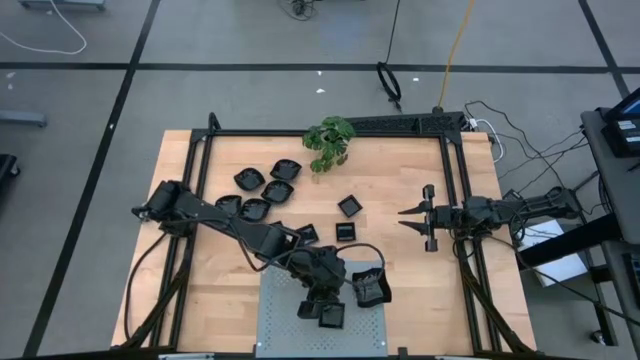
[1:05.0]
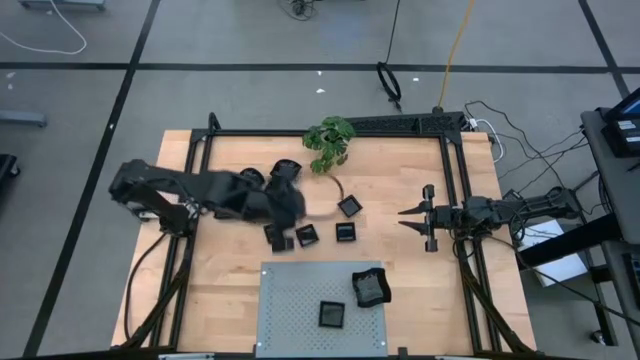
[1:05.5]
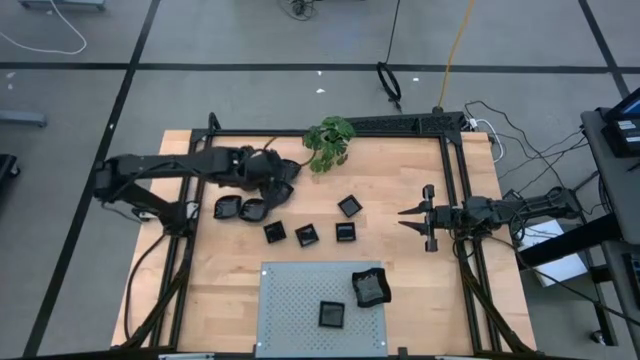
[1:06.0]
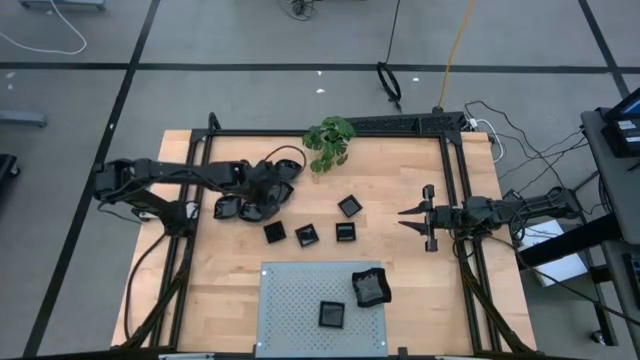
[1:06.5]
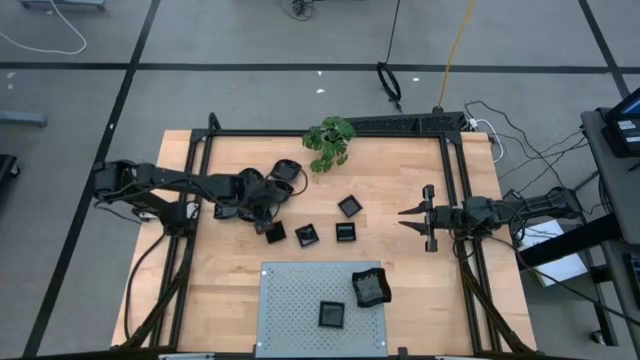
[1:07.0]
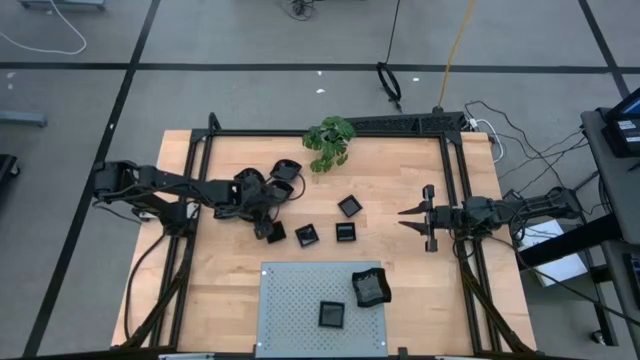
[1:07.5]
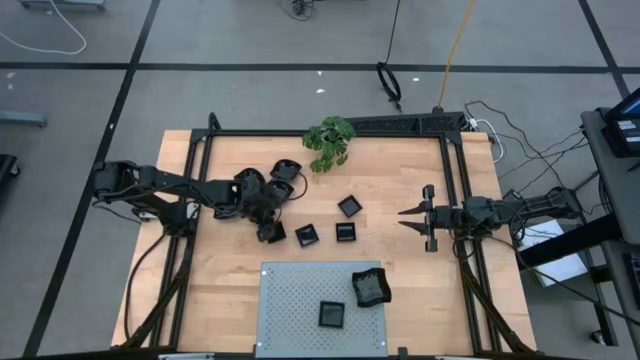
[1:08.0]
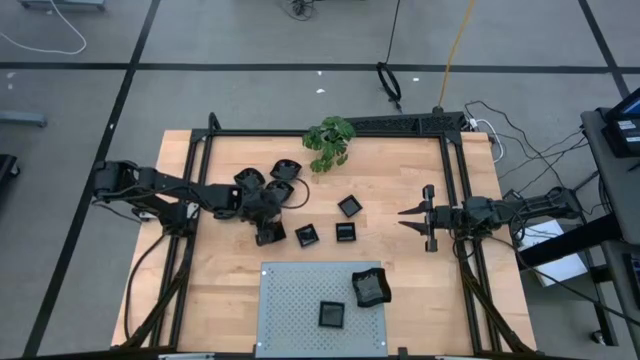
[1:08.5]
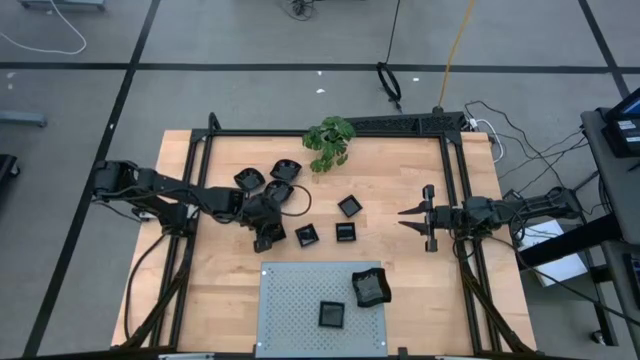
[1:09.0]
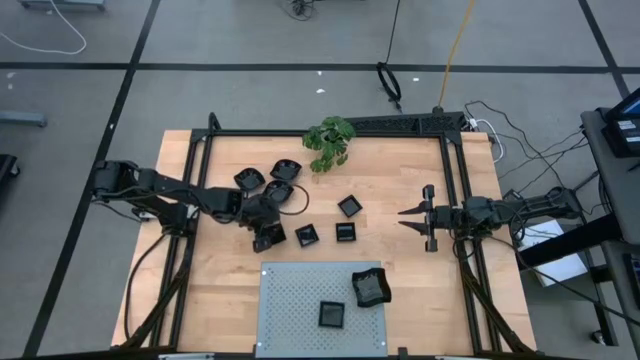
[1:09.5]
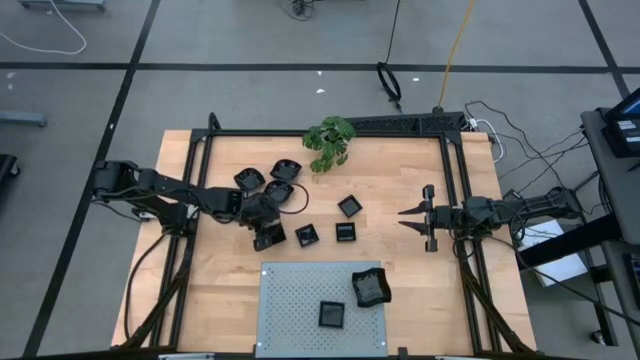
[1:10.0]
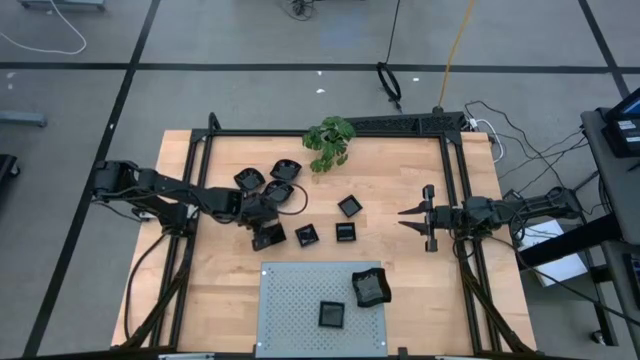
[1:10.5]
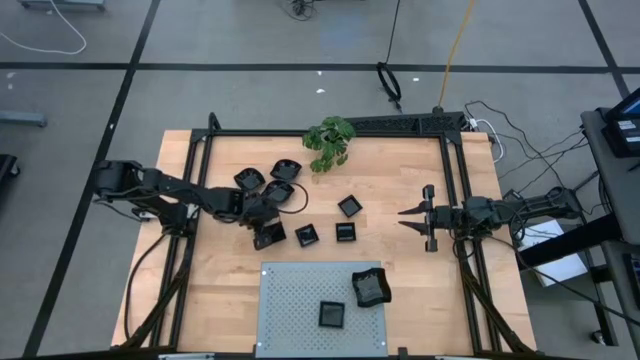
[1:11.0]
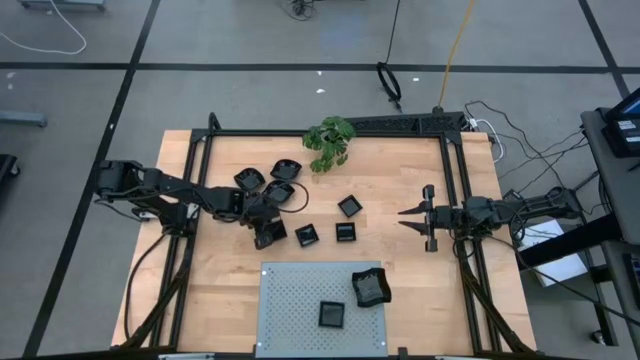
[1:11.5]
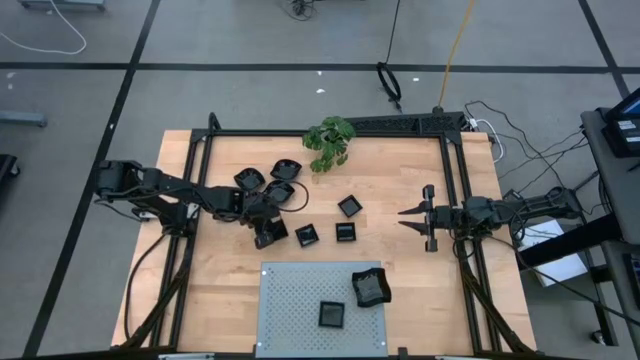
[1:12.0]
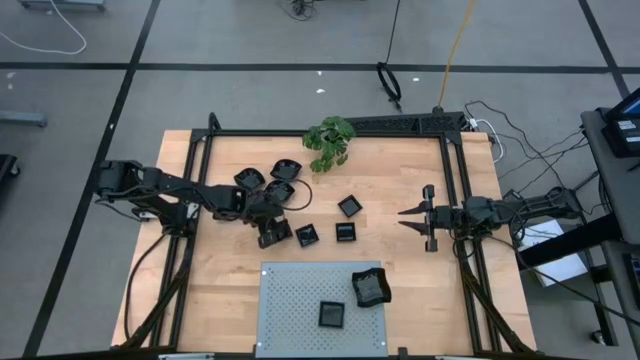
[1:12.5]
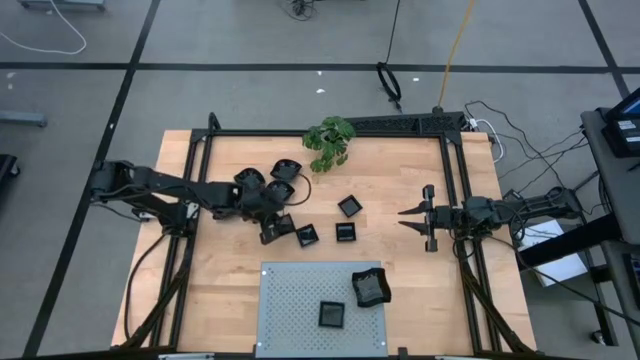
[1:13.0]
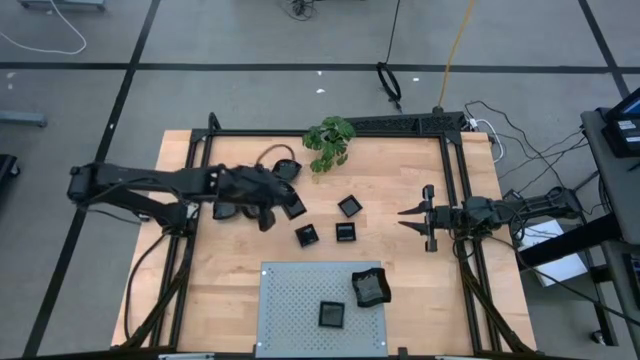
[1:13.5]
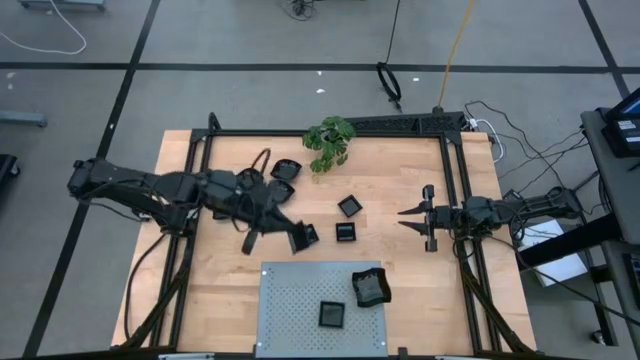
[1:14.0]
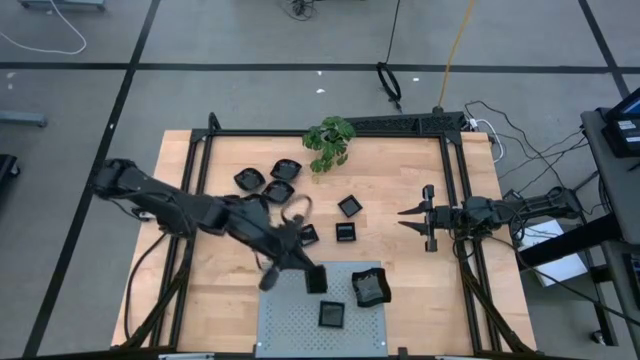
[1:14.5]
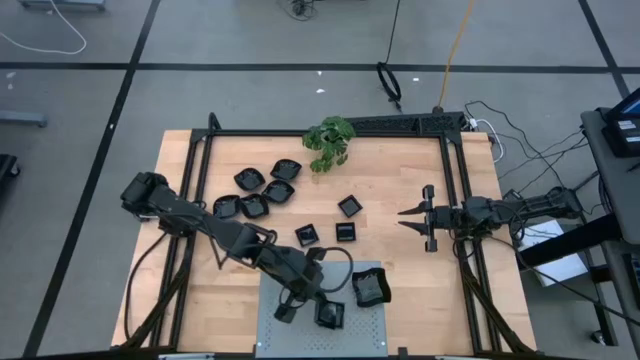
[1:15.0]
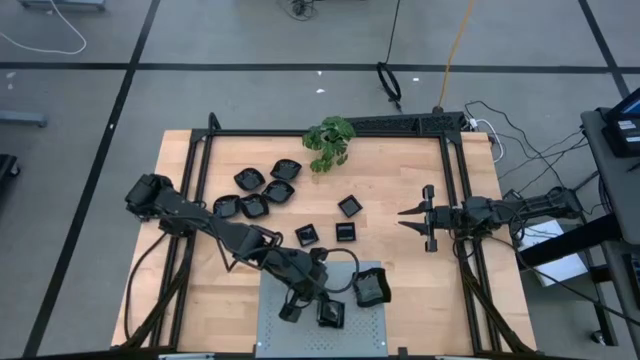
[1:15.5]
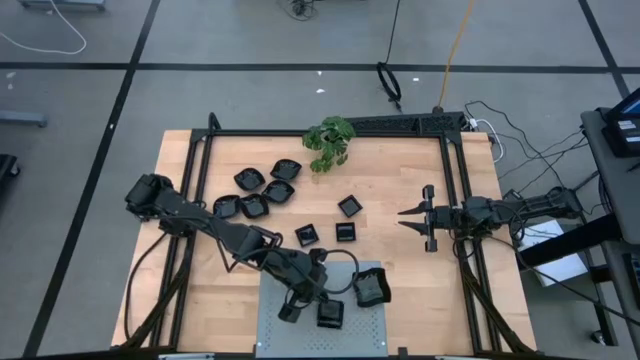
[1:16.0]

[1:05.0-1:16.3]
Task: Pick & Place Mini shaped plates
Stack the square plate onto the other square plate on the shelf

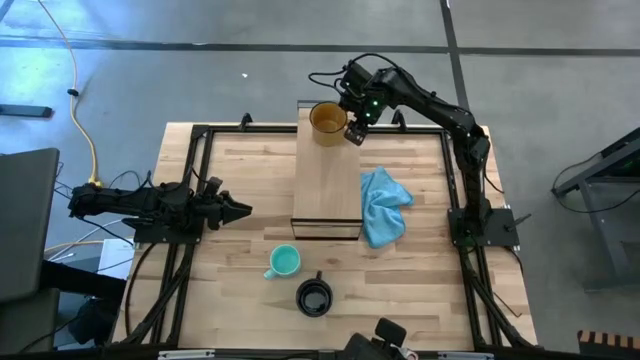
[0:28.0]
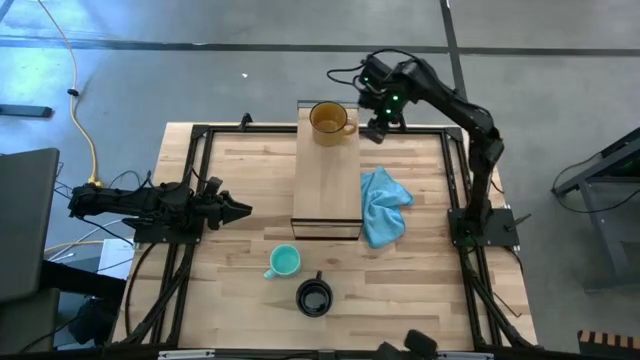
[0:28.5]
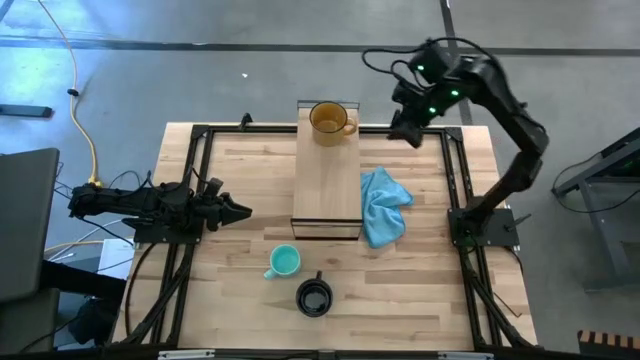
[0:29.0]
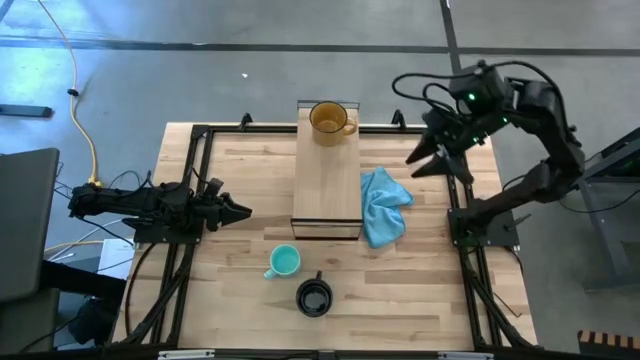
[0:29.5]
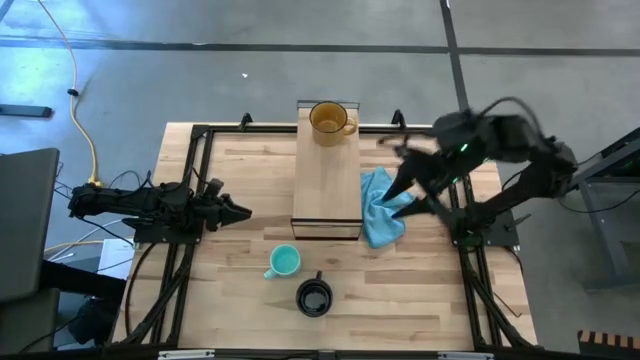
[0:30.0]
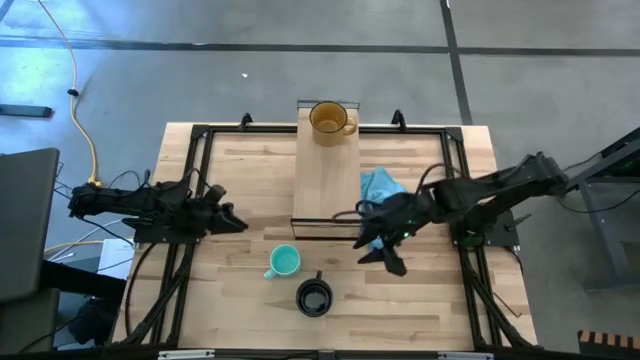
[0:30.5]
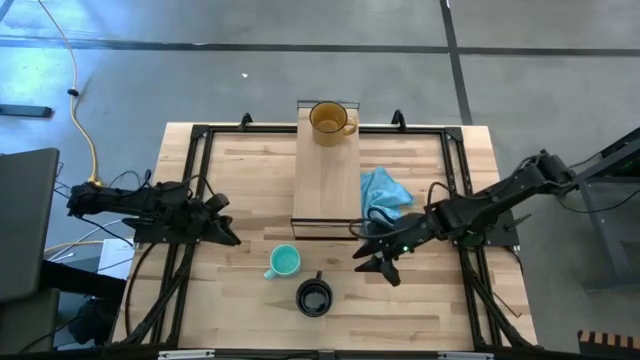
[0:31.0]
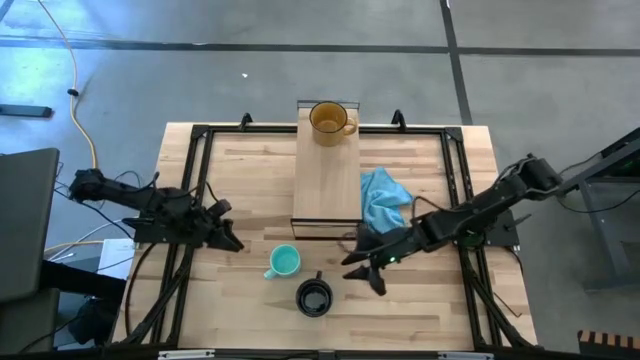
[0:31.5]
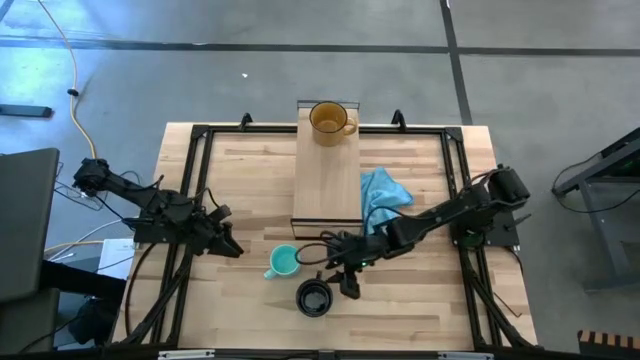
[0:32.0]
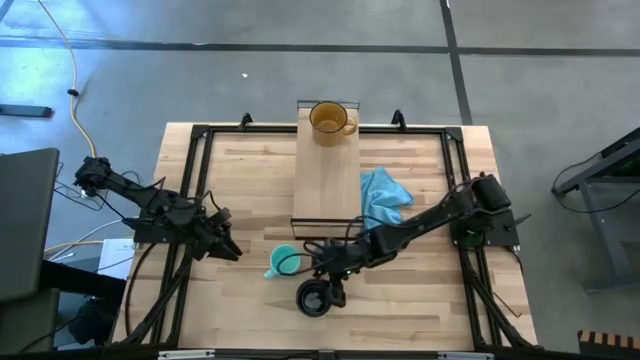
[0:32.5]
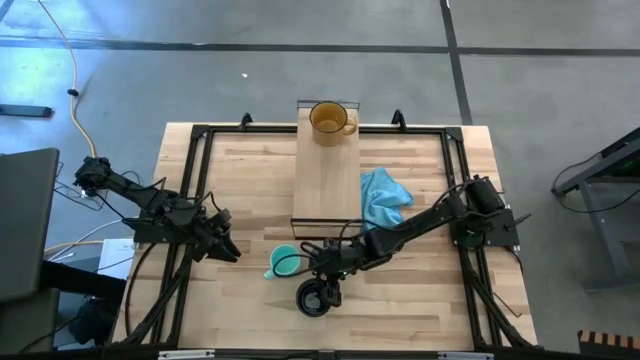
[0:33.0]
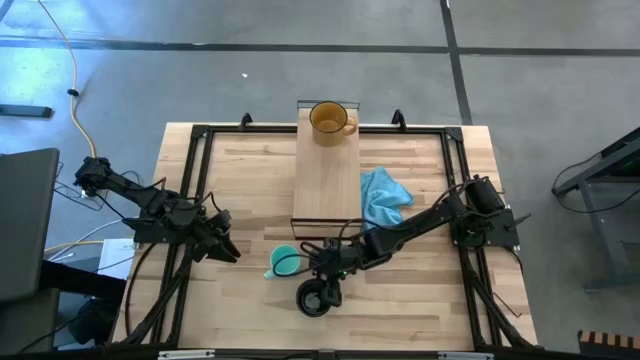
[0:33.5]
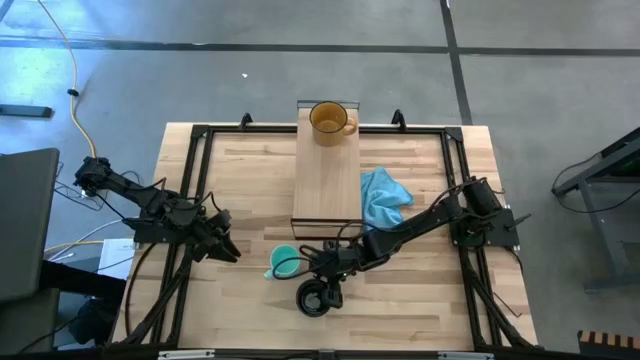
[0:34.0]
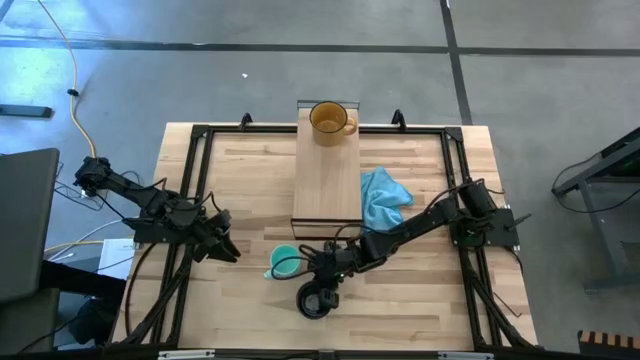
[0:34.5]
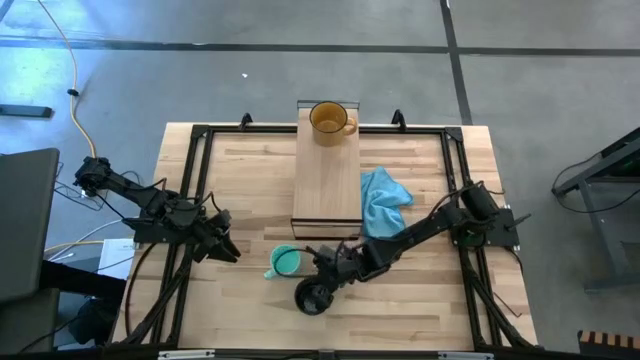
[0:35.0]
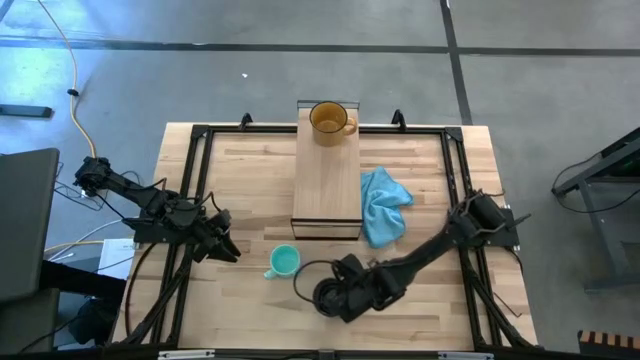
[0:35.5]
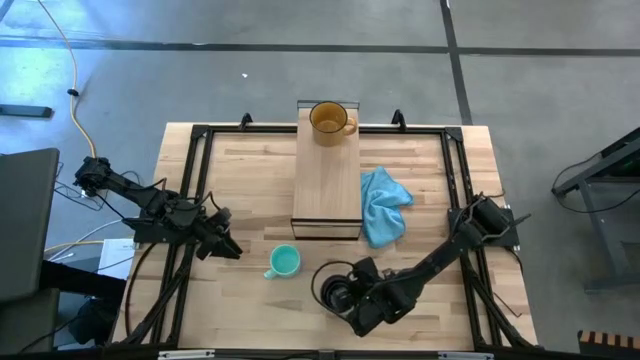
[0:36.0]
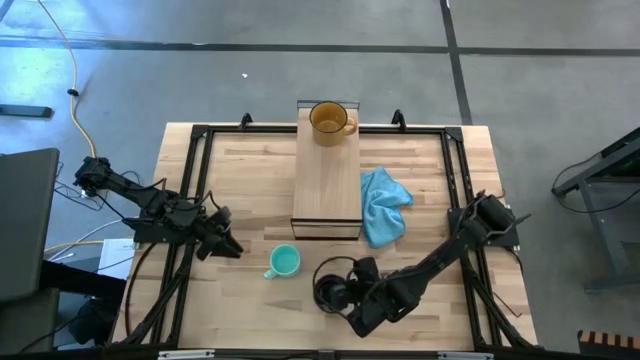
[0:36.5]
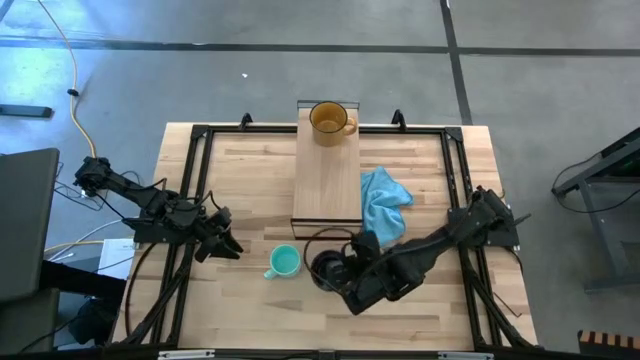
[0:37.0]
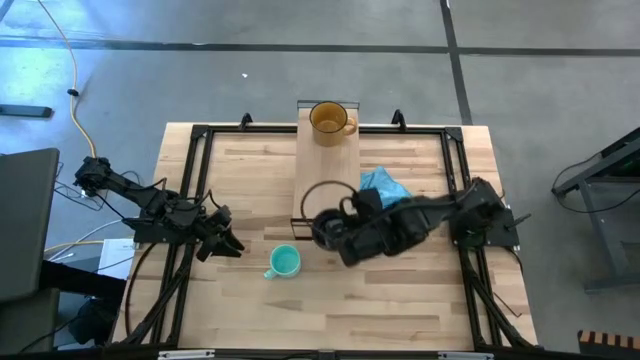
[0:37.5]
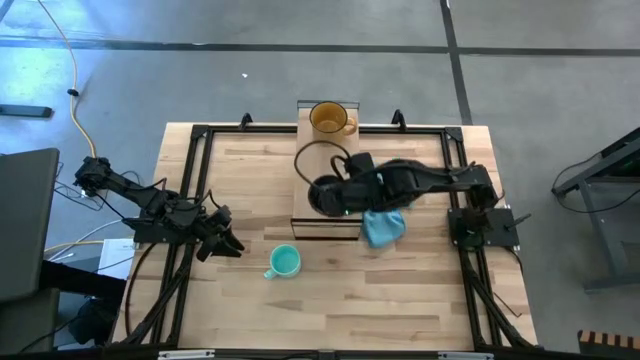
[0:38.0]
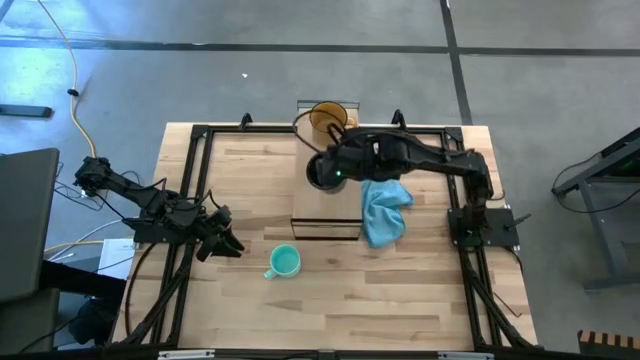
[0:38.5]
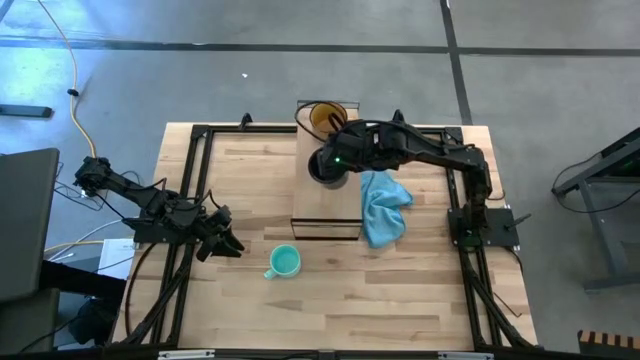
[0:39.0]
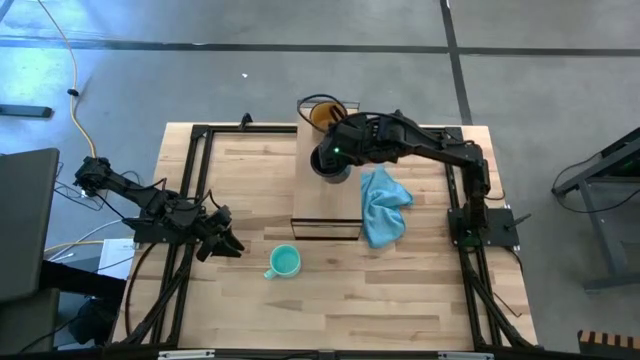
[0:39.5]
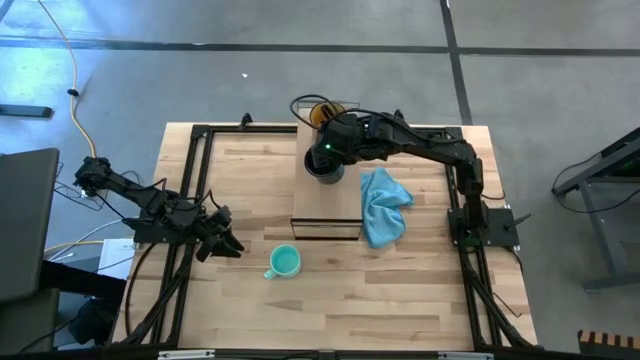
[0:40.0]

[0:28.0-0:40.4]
Task: Stack small to large cups/mugs on shelf
Put the dark blue mug on the shelf
